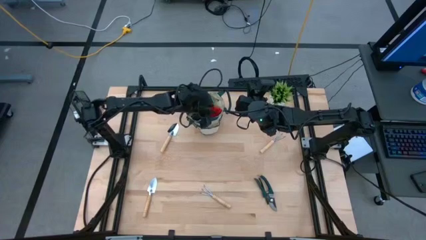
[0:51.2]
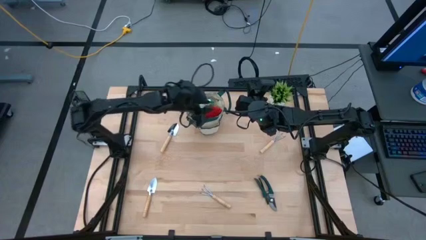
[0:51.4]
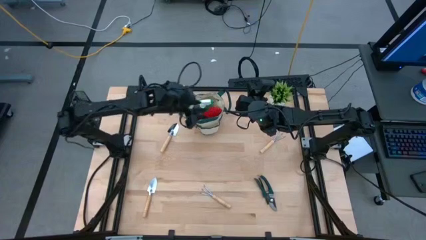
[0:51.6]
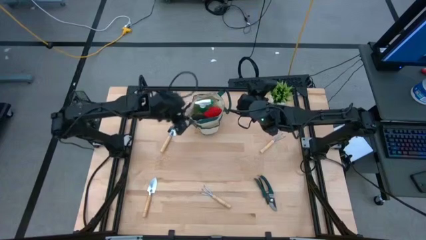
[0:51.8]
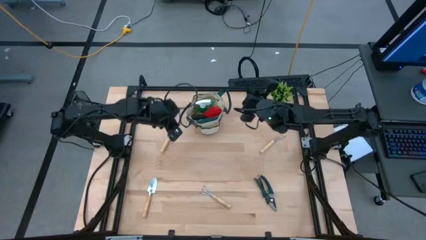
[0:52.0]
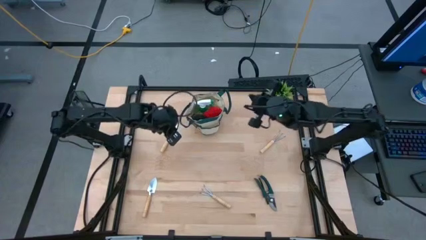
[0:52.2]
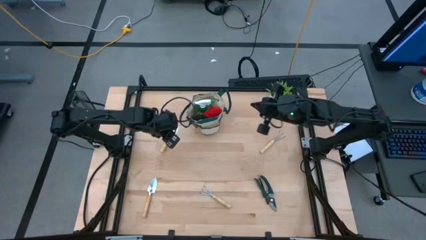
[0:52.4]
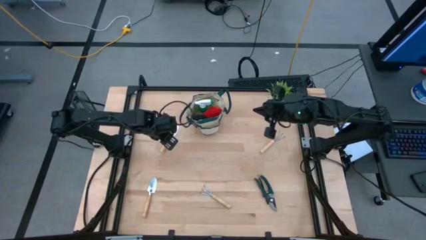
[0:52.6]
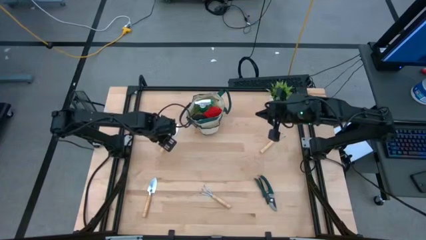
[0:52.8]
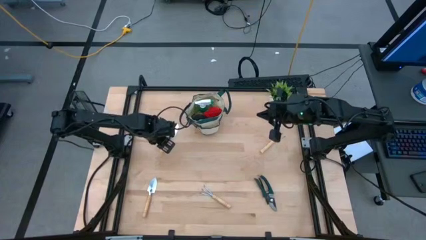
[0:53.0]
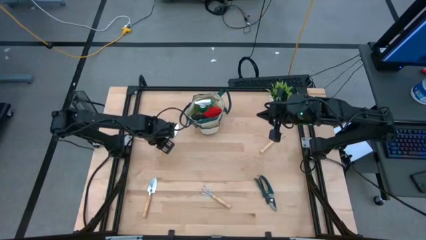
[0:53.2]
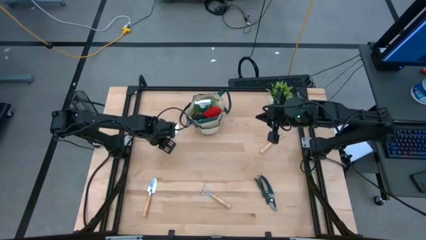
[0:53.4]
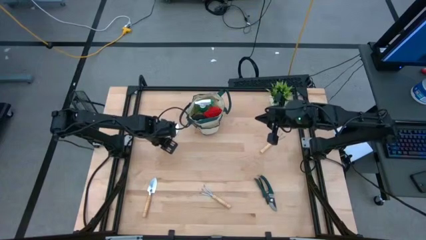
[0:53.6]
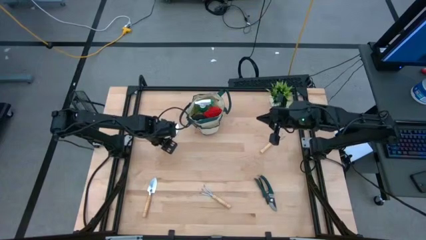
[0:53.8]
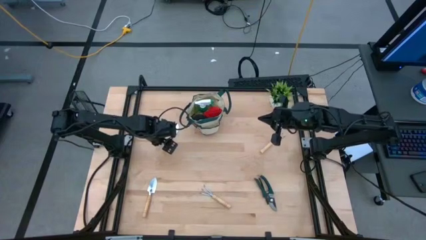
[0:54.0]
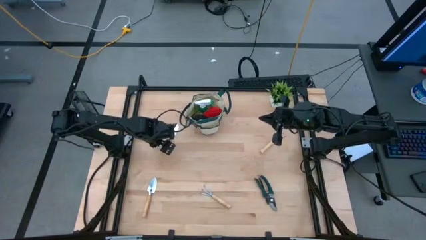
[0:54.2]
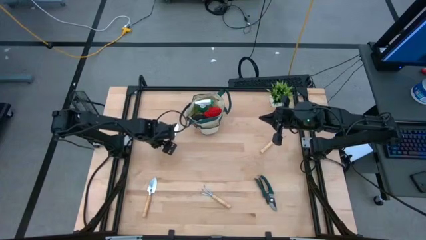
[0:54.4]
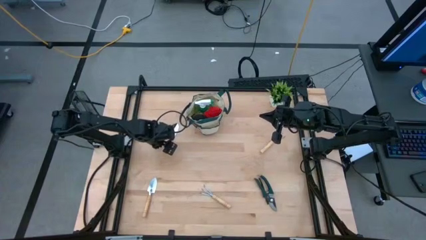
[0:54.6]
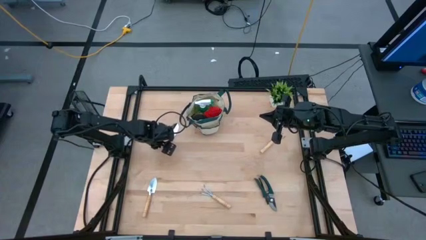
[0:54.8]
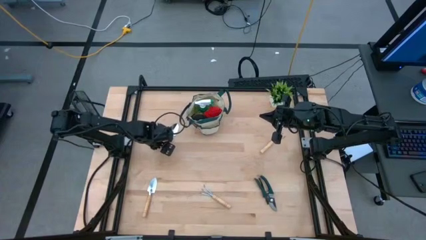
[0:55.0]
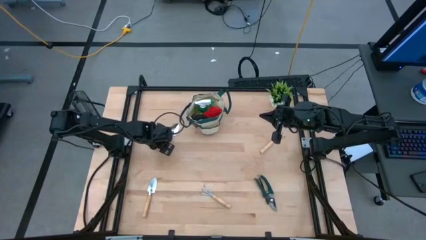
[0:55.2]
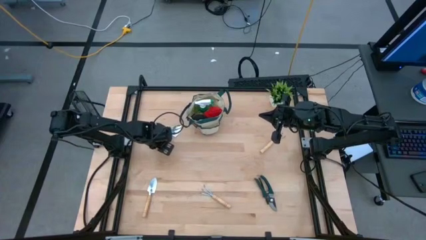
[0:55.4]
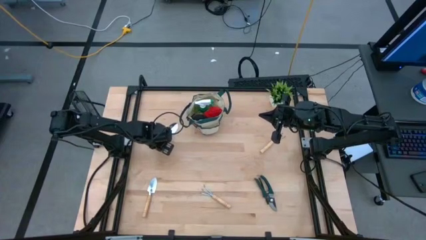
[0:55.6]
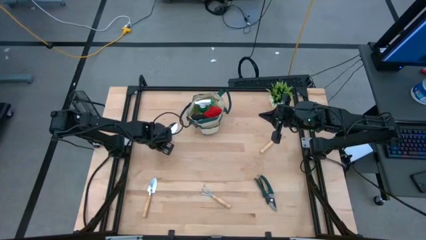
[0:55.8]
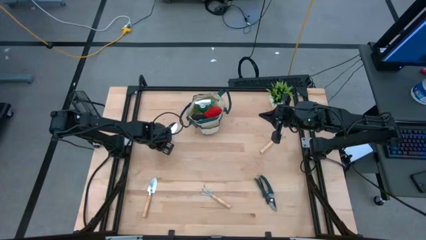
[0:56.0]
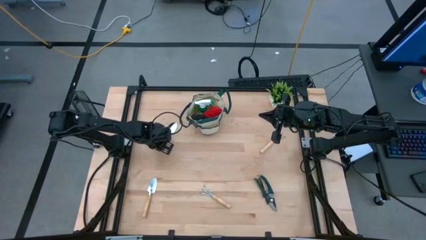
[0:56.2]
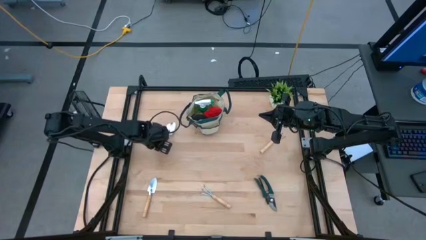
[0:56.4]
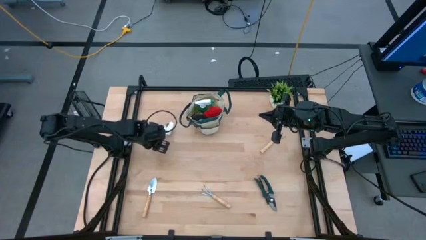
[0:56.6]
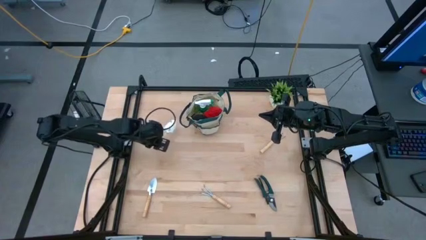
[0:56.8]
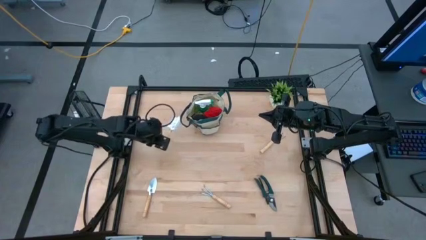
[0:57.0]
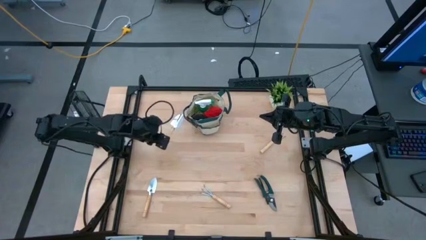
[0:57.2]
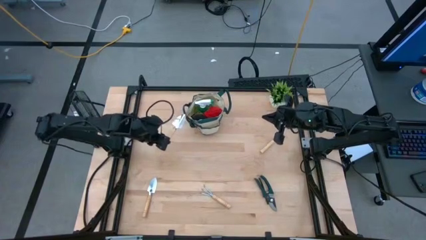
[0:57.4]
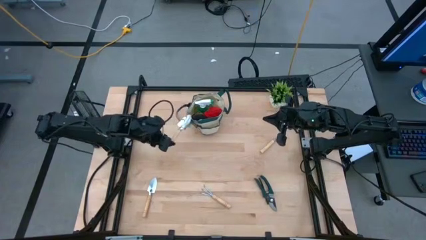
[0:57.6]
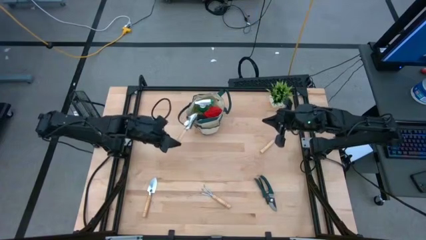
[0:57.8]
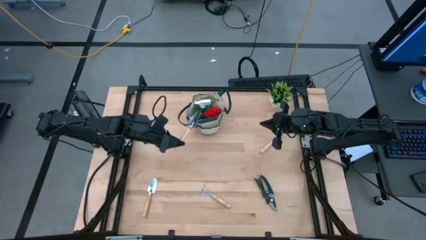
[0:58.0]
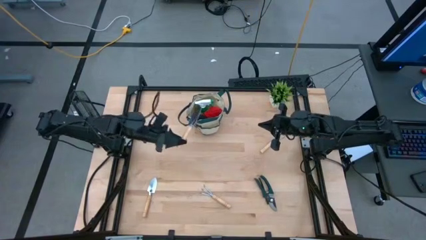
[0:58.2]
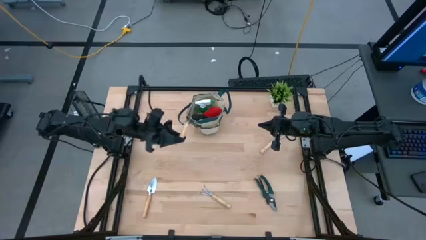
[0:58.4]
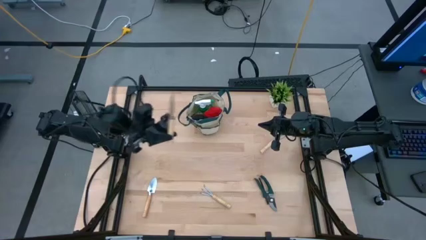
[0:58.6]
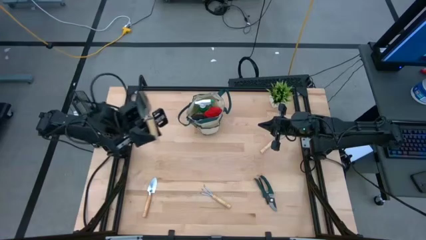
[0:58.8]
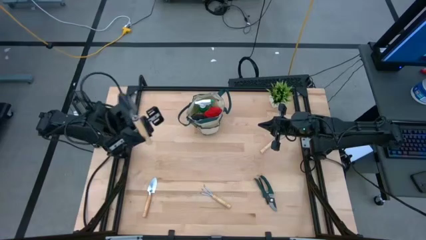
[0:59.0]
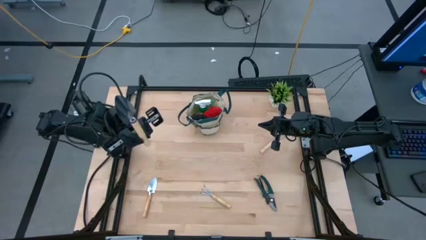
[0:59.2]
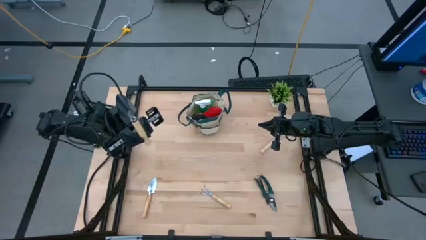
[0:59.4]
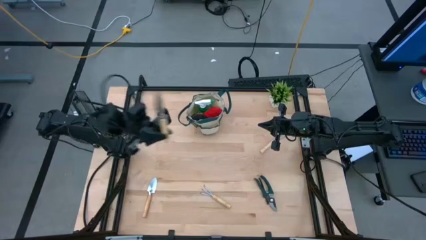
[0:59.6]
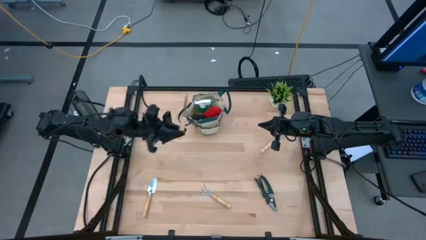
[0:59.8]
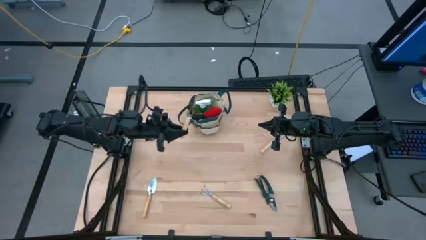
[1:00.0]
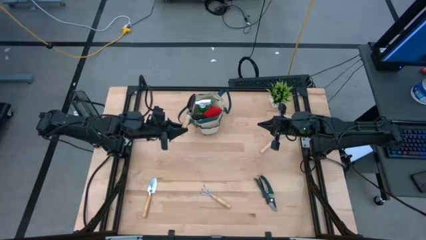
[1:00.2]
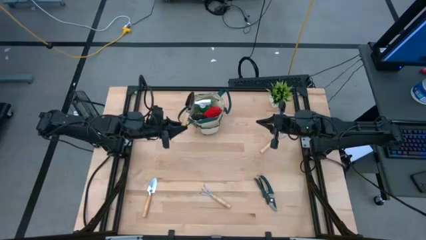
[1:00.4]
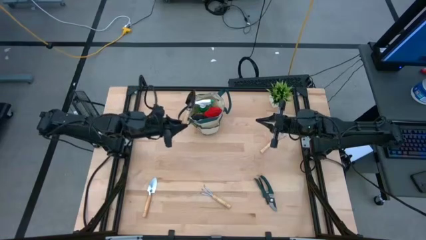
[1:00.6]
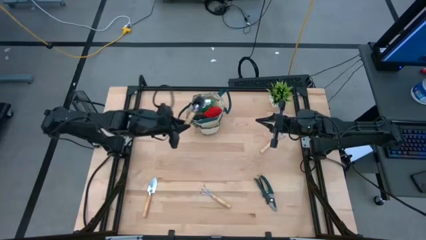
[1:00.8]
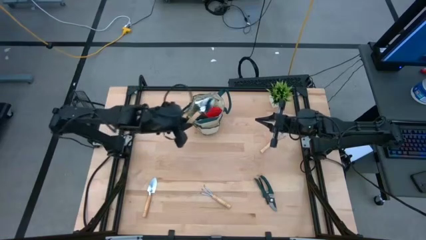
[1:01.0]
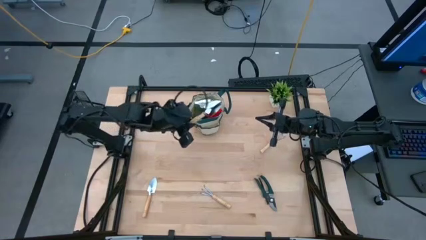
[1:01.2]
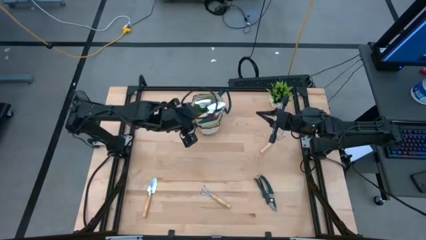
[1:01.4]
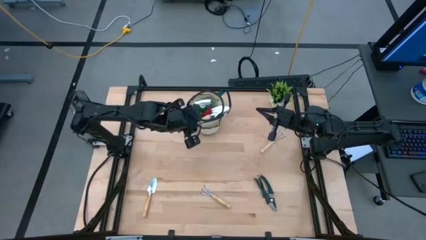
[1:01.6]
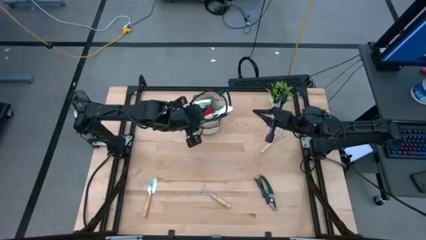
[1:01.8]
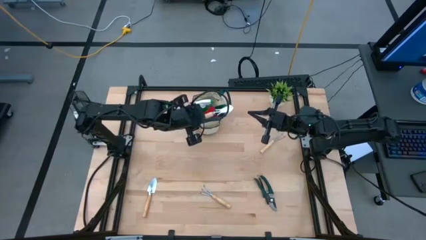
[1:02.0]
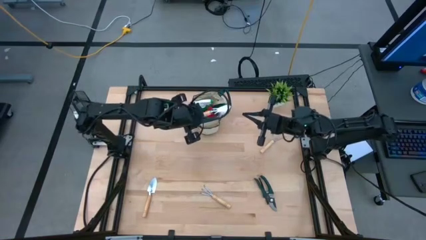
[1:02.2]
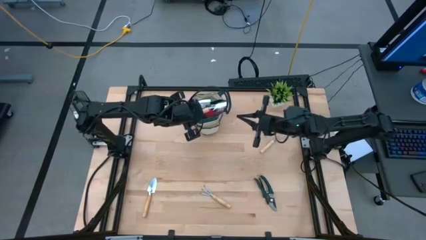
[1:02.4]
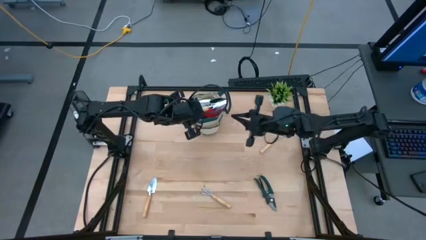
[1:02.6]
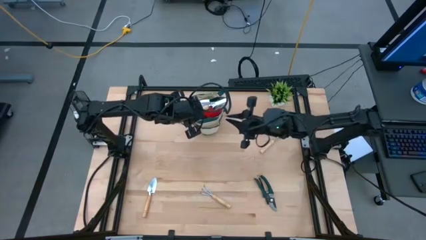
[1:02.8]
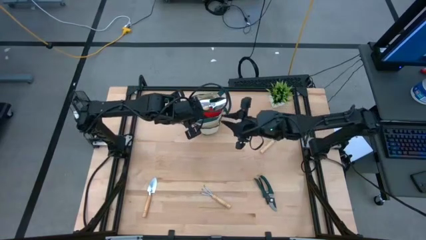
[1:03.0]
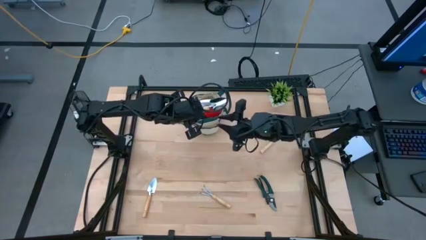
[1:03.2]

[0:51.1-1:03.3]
Task: Pick & Place Garden tools in Gardening bag
Put the top trowel into the gardening bag

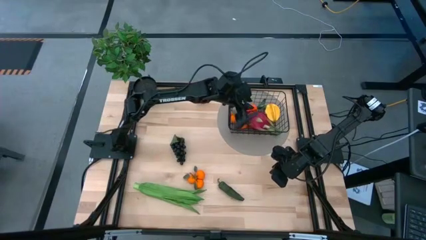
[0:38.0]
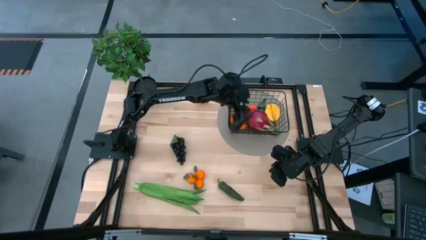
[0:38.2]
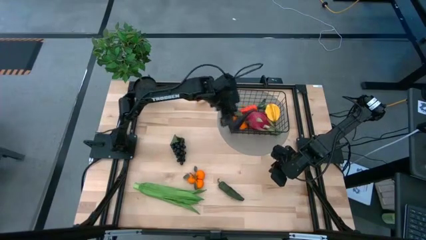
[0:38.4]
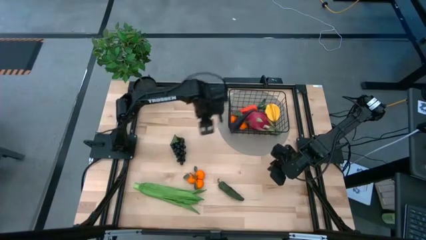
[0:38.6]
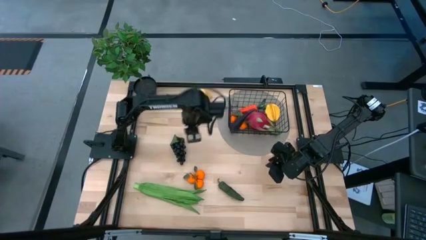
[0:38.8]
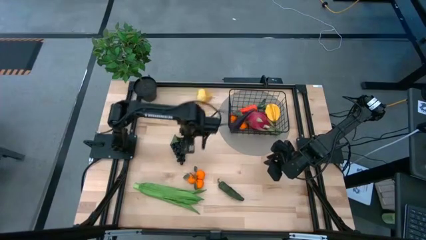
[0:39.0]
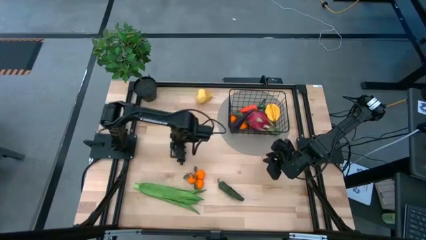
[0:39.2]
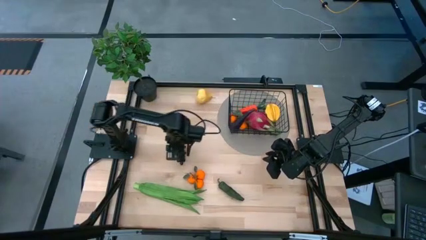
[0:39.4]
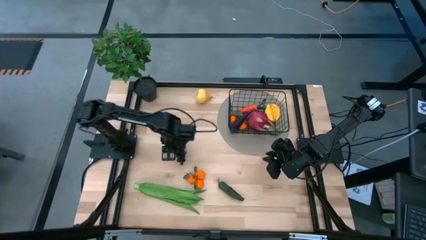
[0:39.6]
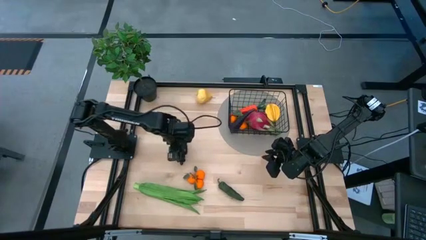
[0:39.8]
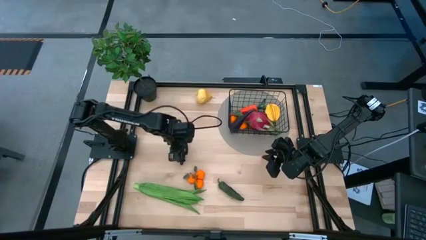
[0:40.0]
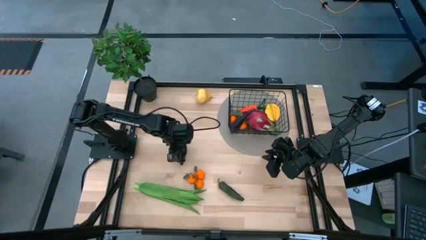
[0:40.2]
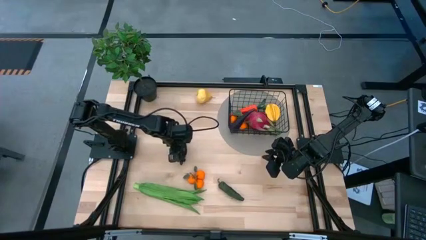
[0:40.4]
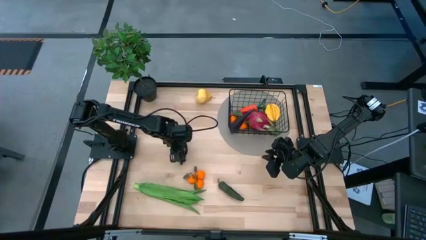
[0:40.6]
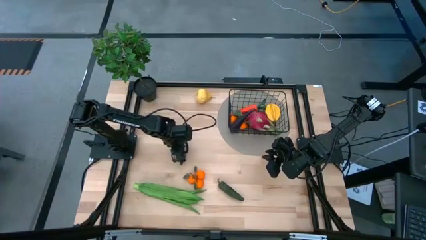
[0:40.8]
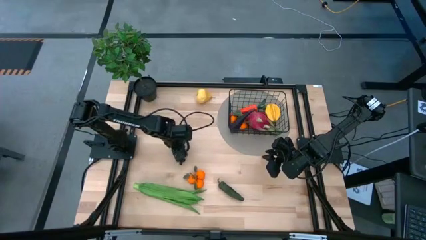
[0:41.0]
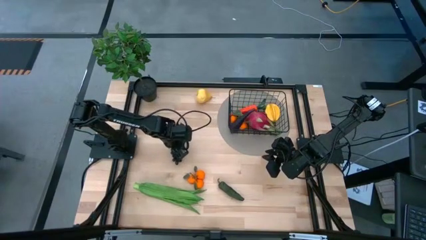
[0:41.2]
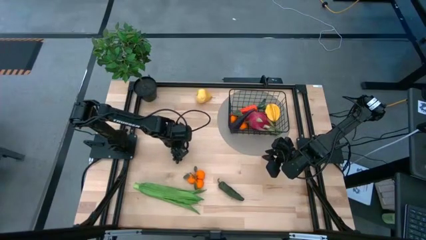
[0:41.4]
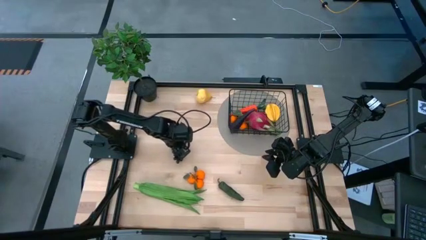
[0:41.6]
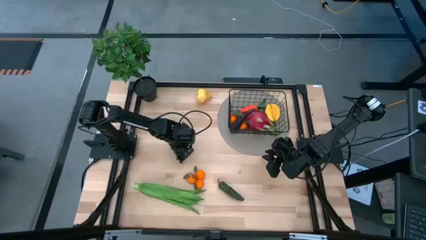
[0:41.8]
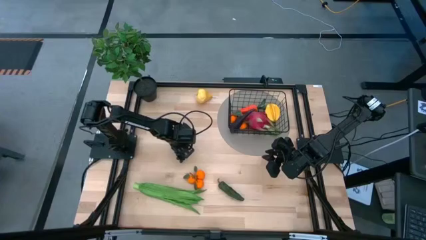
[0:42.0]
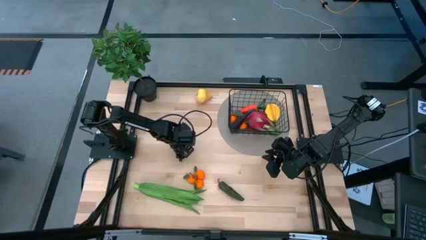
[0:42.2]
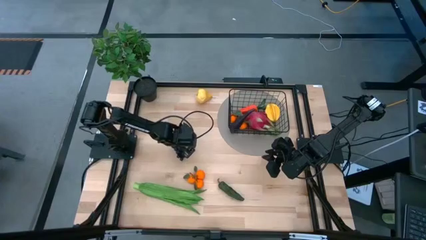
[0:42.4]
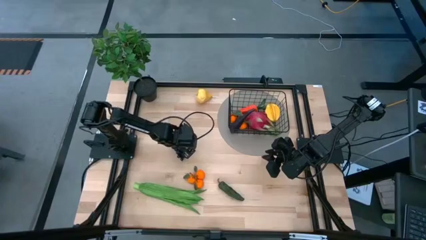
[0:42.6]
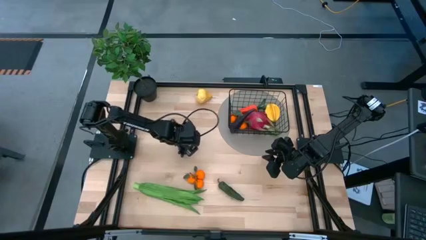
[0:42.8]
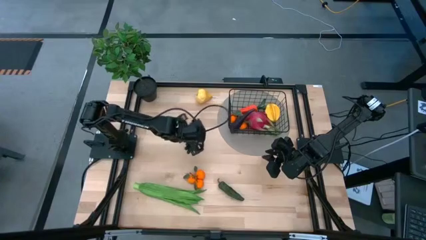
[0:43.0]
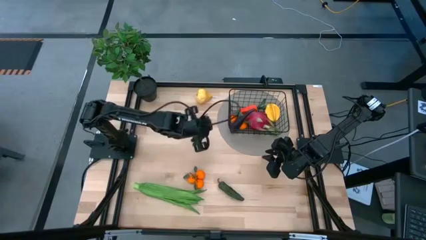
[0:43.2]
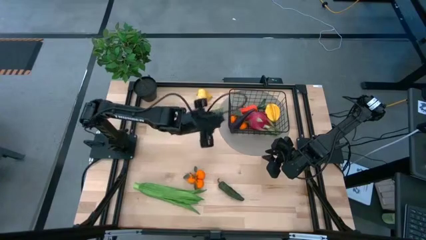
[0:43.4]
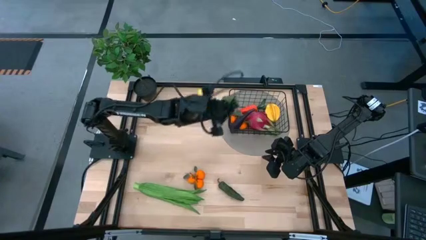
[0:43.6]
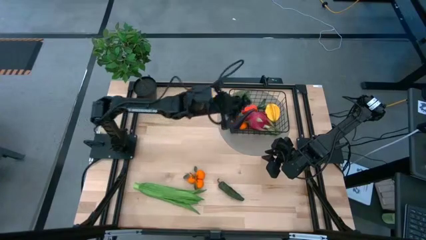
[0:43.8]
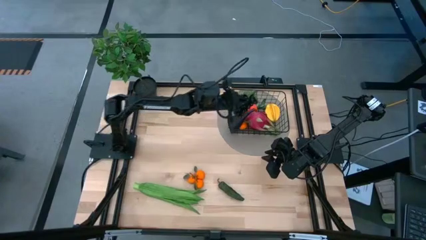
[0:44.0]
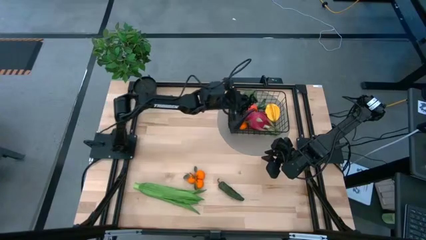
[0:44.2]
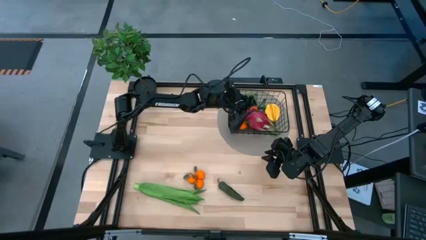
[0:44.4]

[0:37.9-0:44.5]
Task: Build produce basket
Put the grapes into the wire basket
